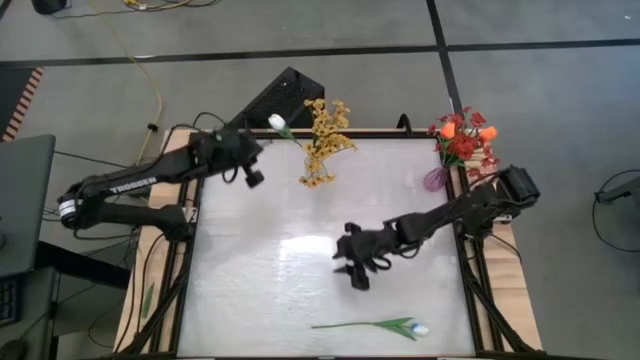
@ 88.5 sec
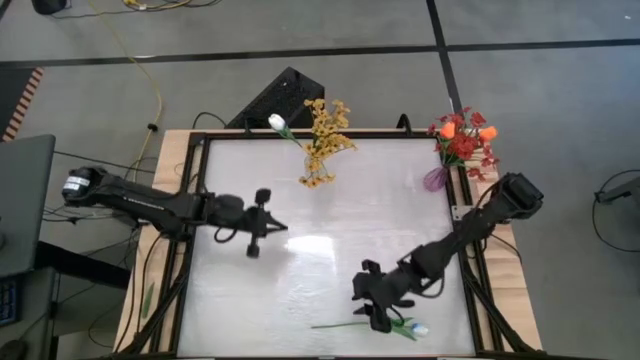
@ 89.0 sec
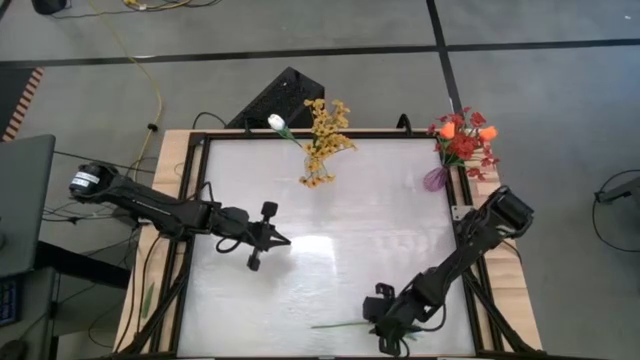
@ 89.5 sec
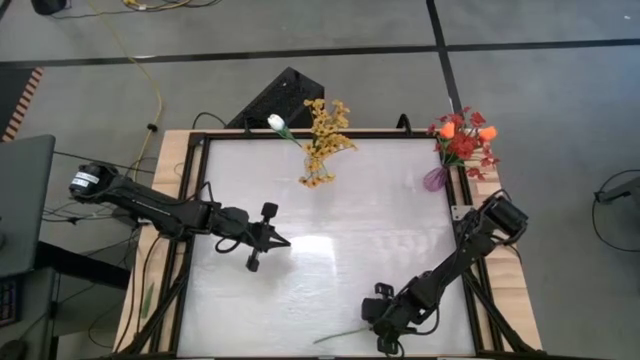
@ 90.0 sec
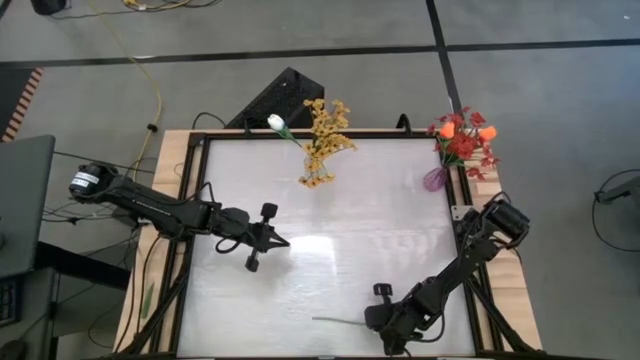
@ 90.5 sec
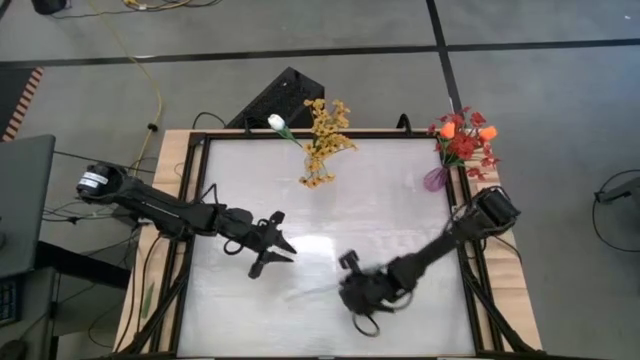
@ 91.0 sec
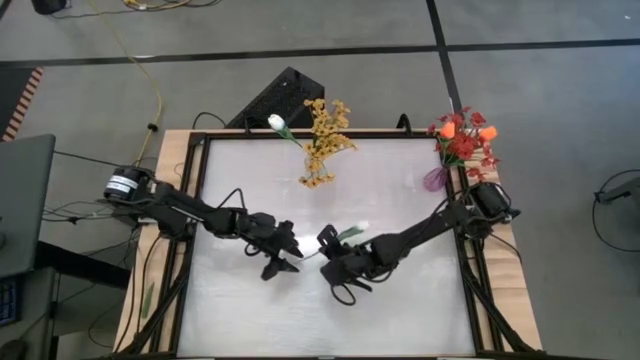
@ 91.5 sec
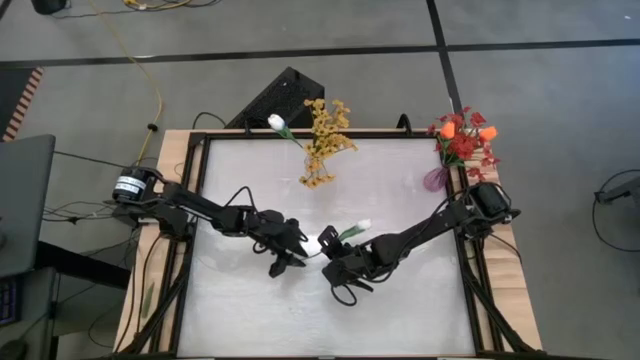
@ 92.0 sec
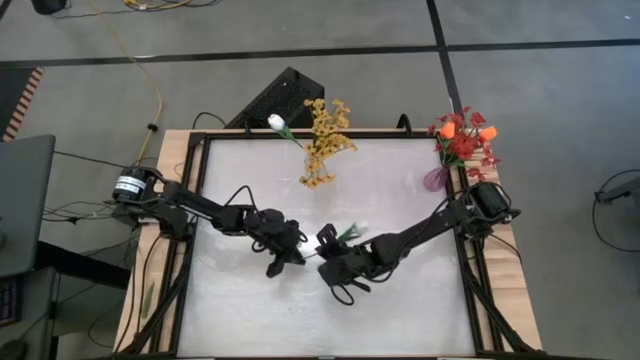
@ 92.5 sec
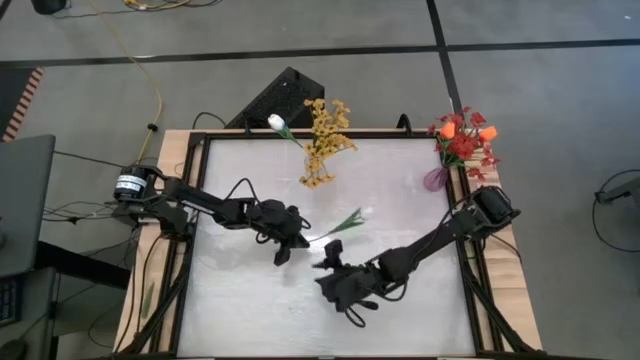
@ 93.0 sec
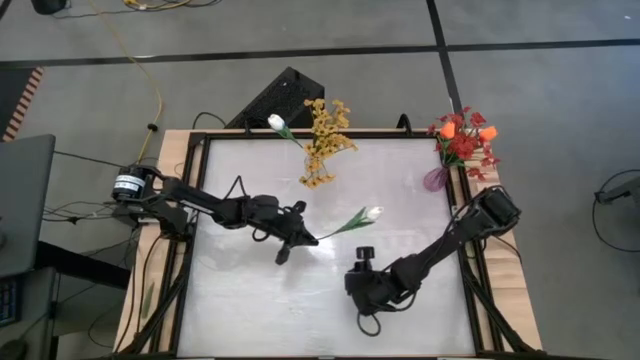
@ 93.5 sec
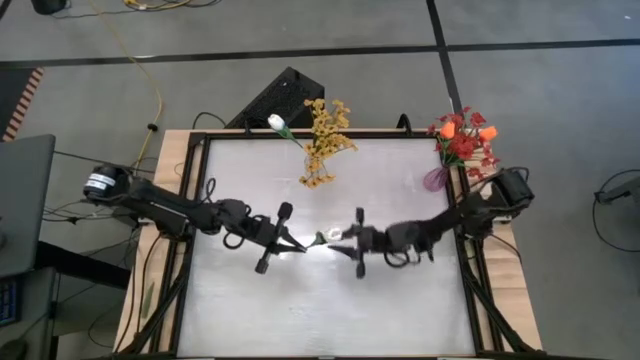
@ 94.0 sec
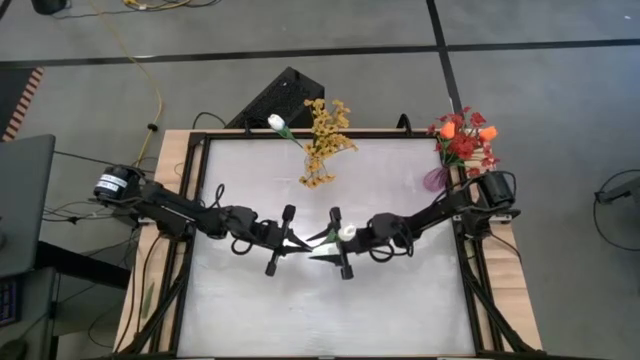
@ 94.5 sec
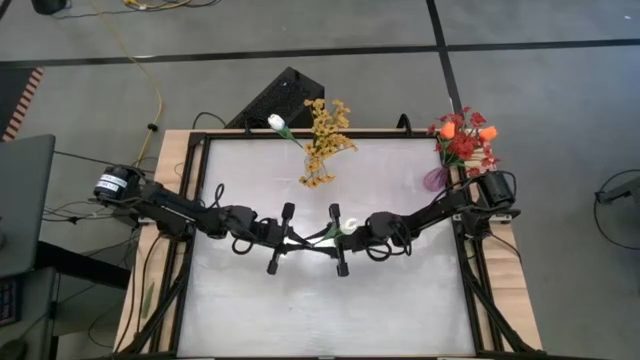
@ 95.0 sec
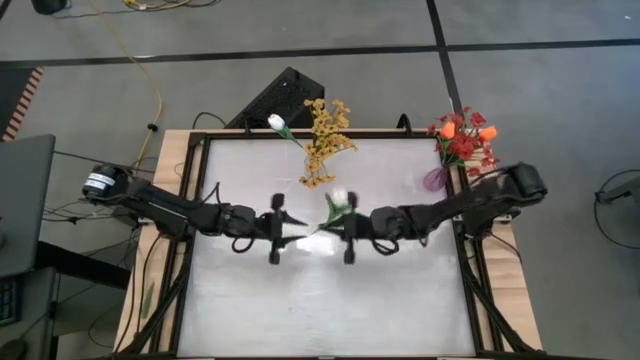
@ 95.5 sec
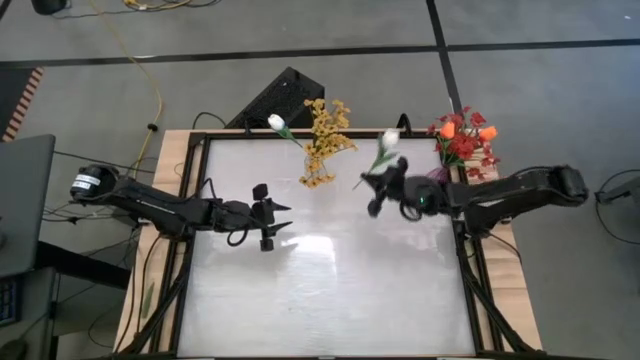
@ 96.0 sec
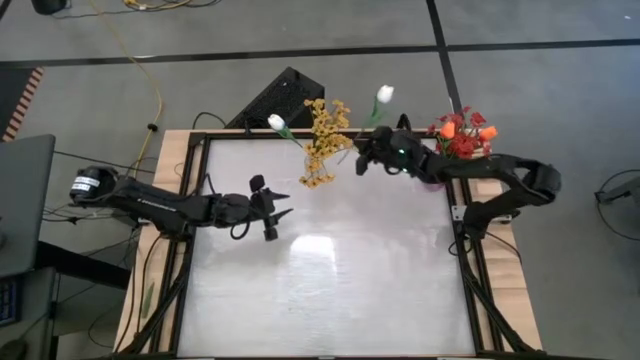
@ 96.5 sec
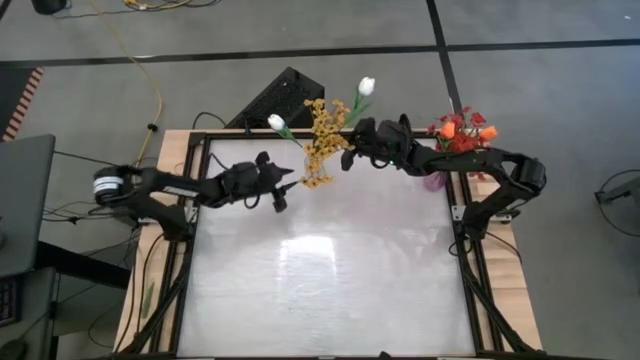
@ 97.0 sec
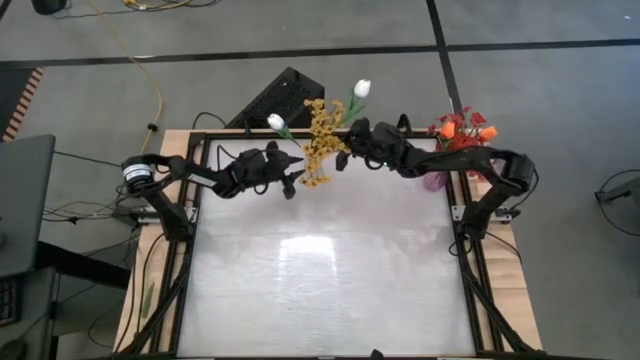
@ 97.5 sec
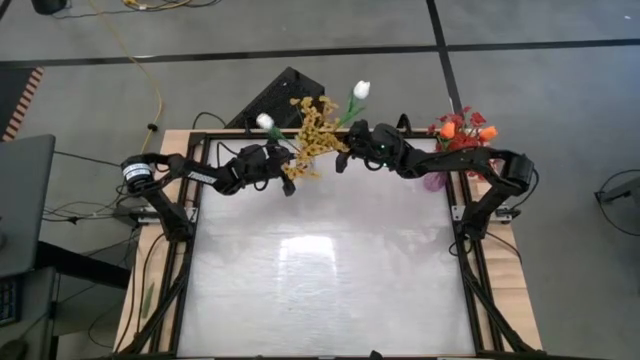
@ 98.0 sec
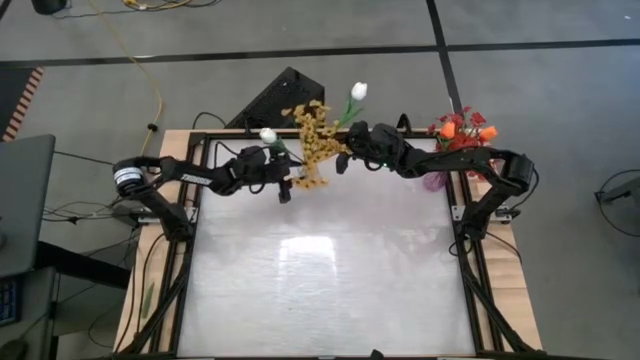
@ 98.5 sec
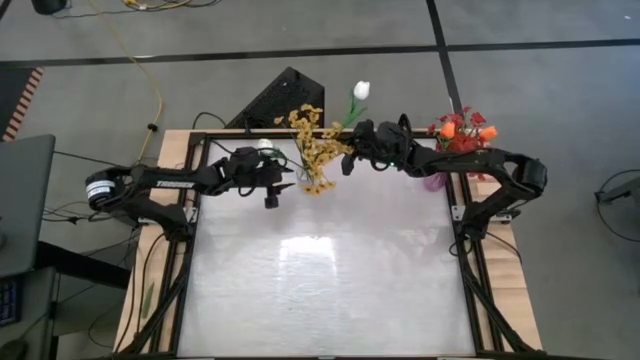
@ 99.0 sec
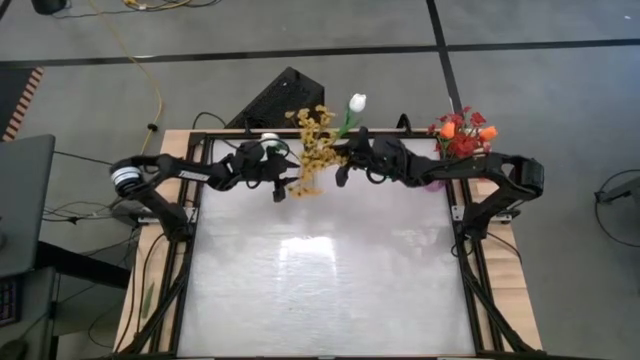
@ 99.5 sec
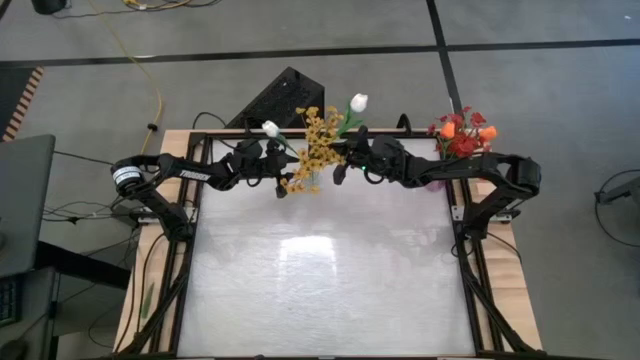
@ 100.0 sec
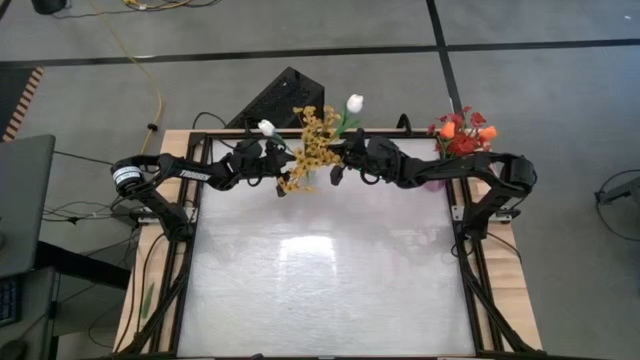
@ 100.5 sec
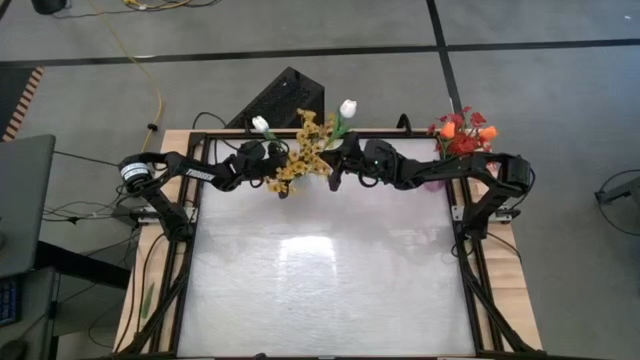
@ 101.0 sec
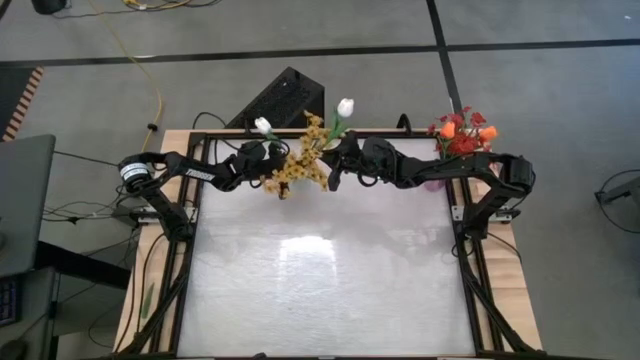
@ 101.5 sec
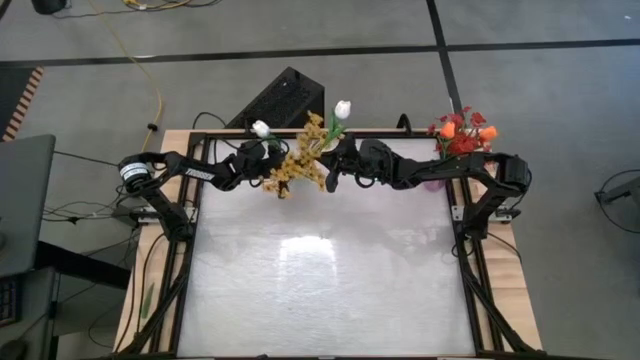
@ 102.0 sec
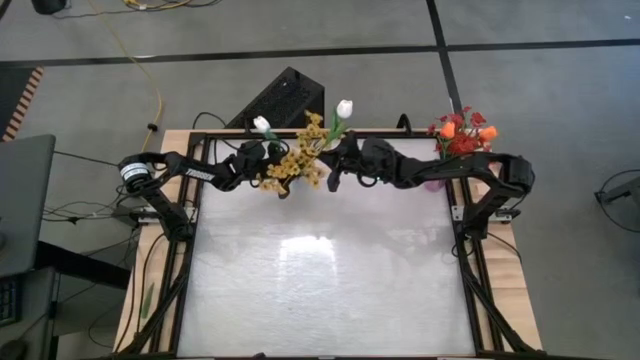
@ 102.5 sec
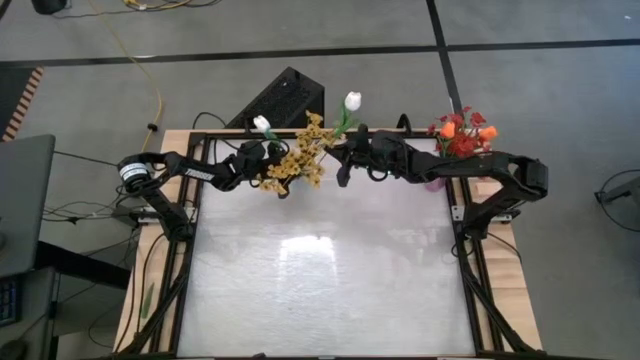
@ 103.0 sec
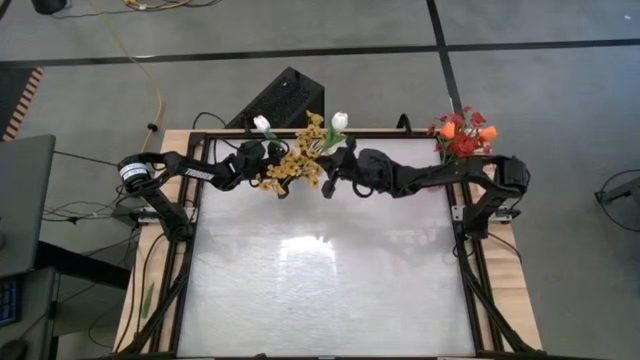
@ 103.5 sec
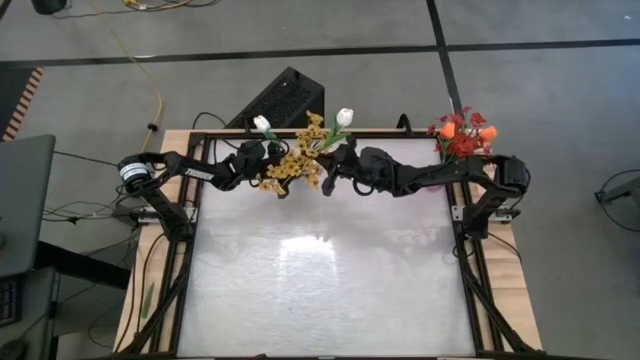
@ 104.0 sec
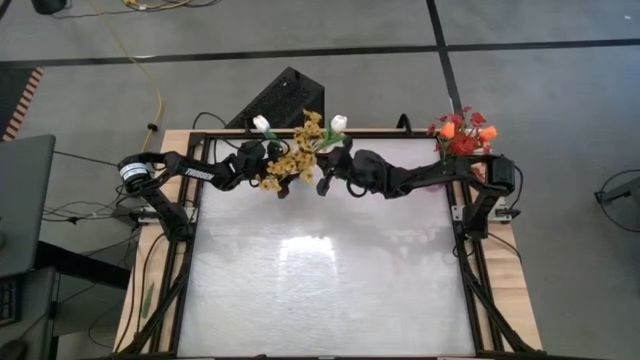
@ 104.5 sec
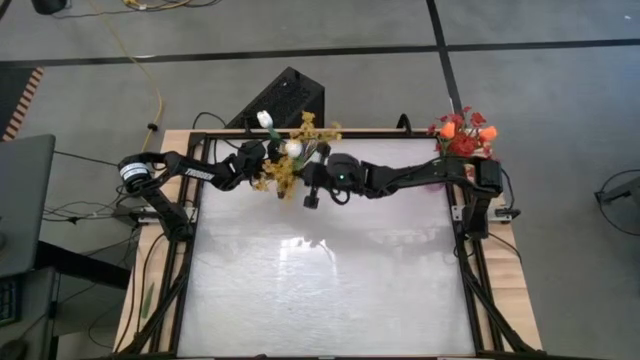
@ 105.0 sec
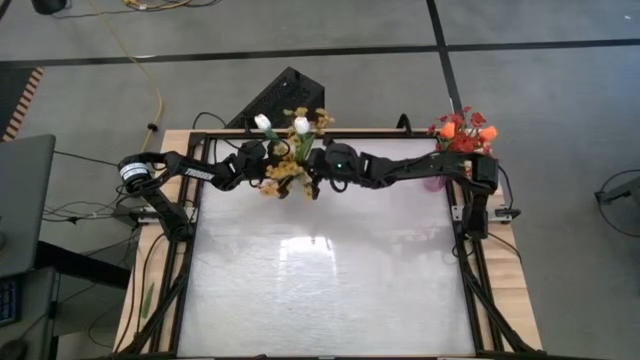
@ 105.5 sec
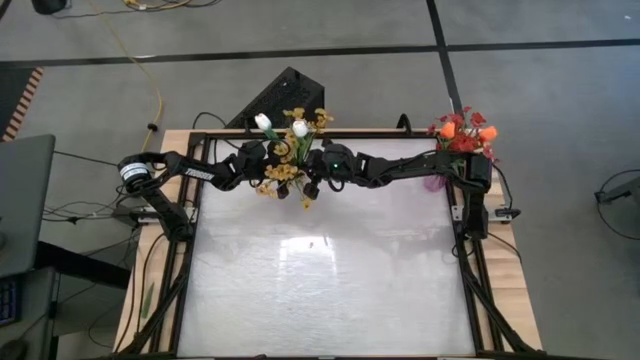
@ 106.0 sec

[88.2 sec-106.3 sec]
Task: Sort flowers into vase by color
Put the white tulip into the transparent vase
